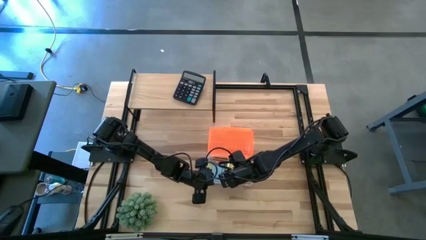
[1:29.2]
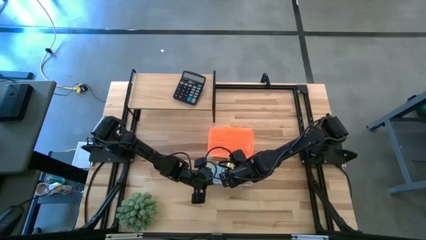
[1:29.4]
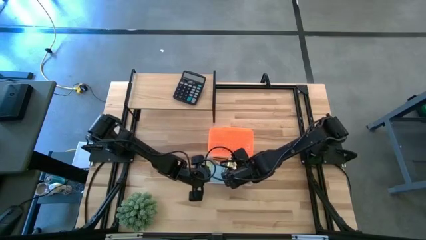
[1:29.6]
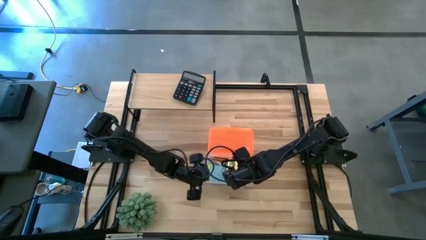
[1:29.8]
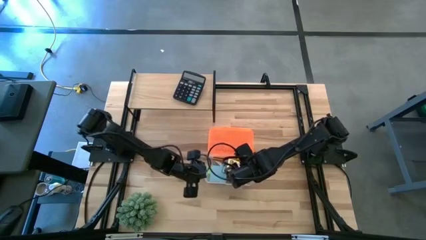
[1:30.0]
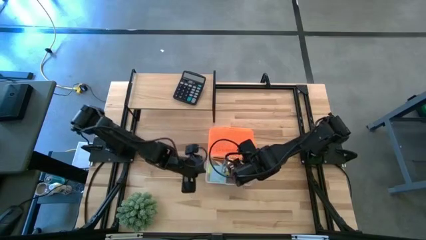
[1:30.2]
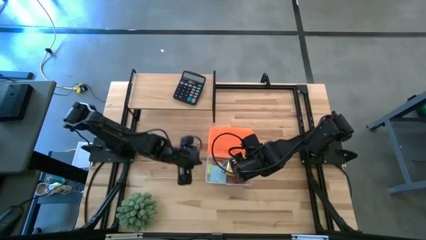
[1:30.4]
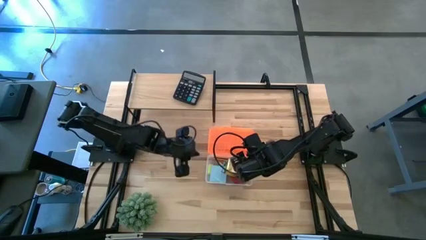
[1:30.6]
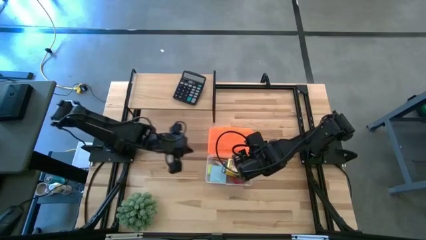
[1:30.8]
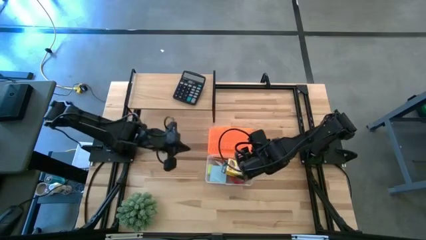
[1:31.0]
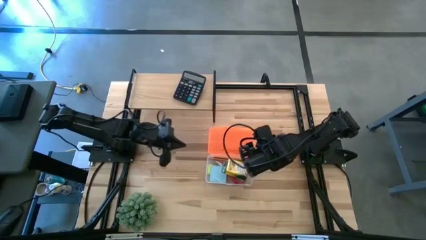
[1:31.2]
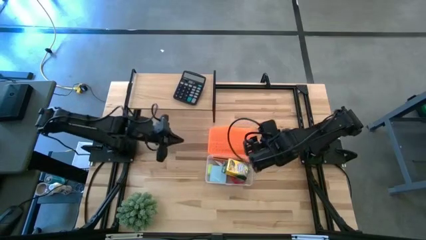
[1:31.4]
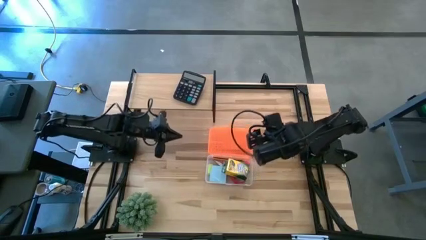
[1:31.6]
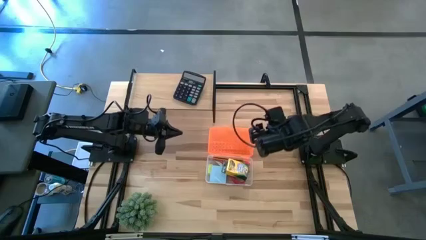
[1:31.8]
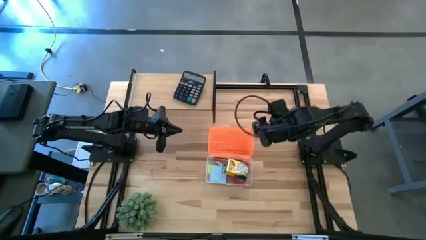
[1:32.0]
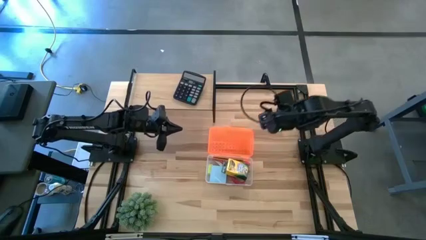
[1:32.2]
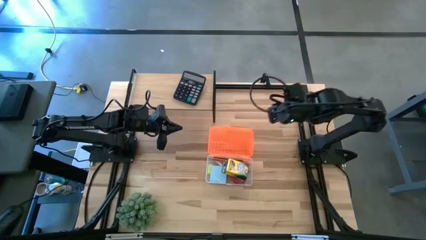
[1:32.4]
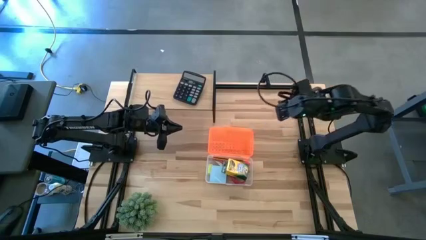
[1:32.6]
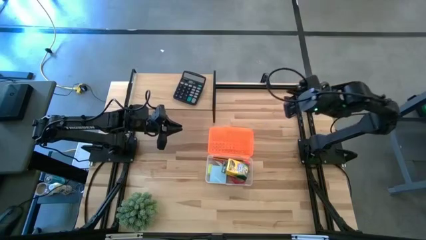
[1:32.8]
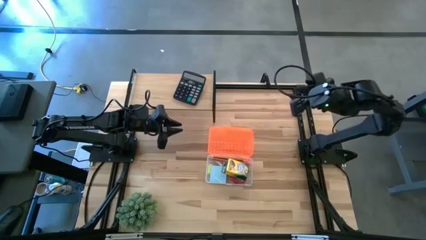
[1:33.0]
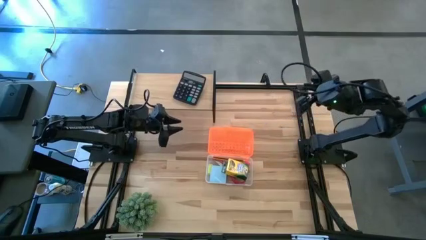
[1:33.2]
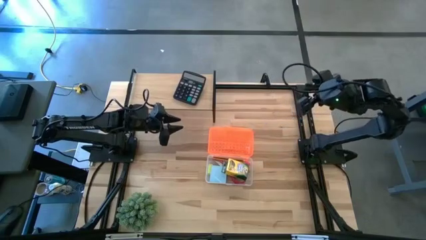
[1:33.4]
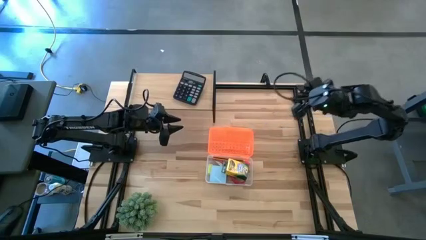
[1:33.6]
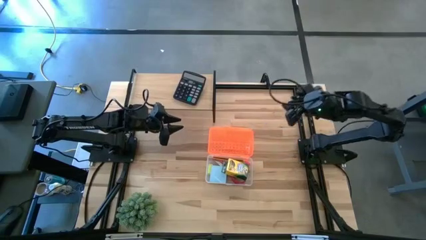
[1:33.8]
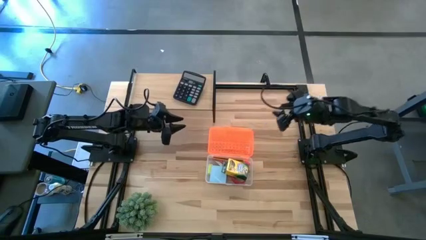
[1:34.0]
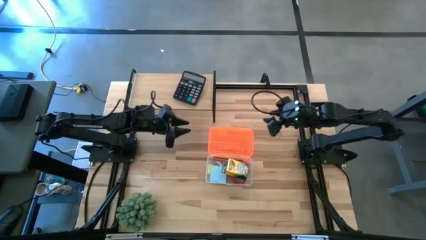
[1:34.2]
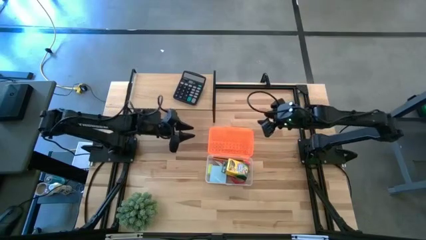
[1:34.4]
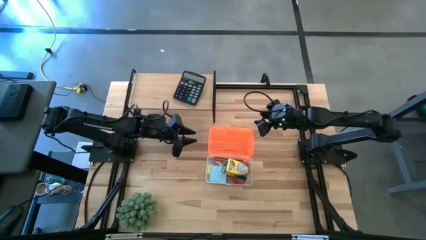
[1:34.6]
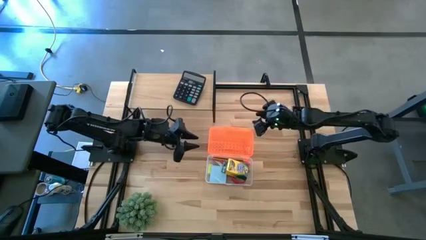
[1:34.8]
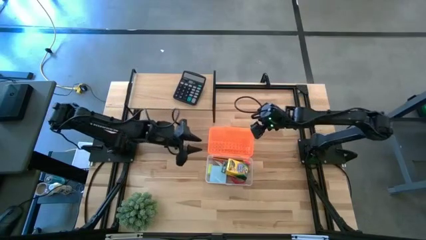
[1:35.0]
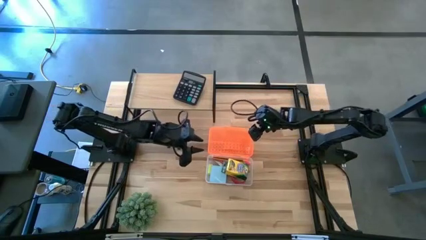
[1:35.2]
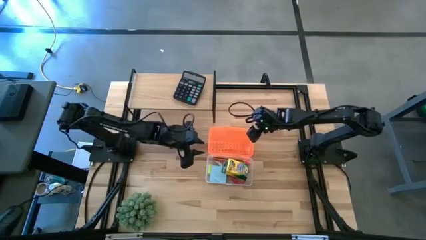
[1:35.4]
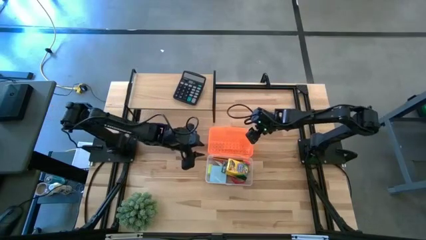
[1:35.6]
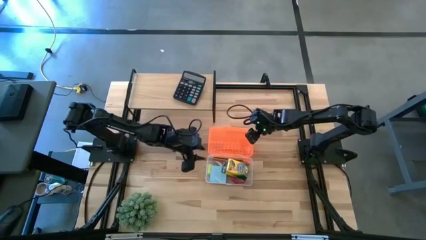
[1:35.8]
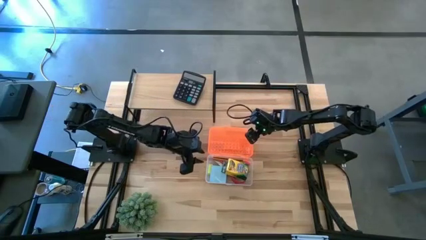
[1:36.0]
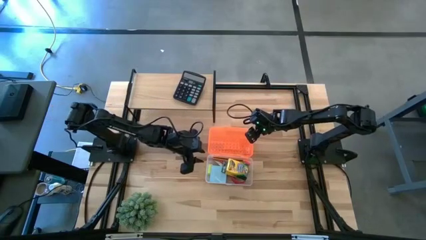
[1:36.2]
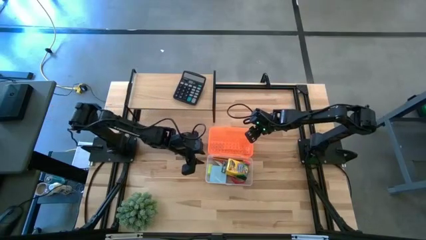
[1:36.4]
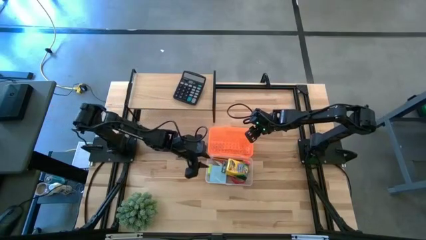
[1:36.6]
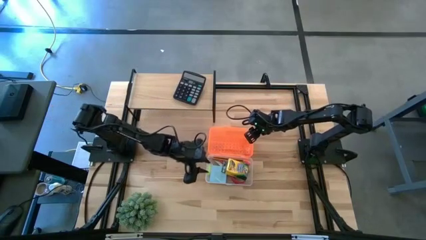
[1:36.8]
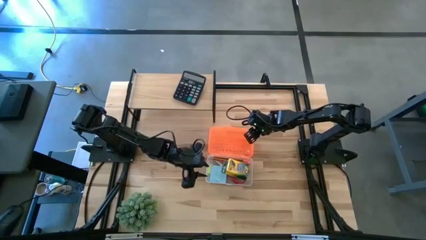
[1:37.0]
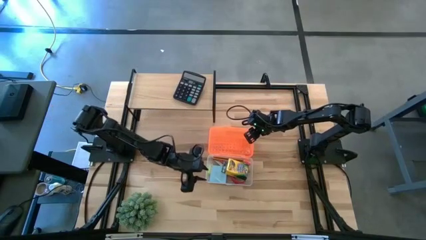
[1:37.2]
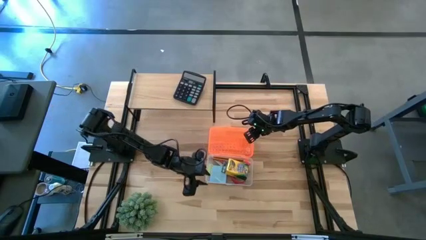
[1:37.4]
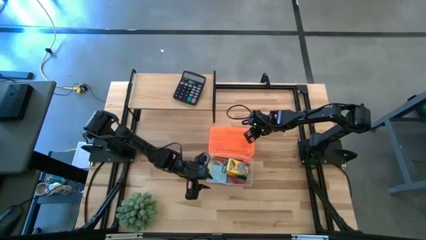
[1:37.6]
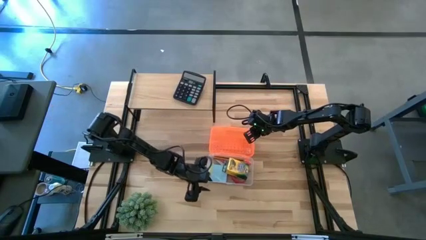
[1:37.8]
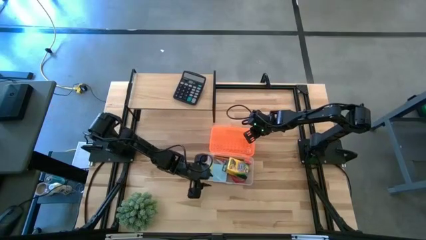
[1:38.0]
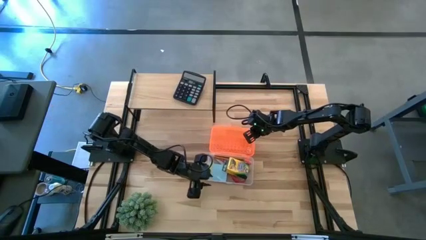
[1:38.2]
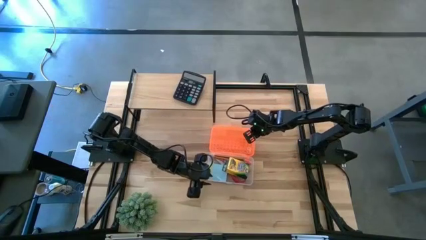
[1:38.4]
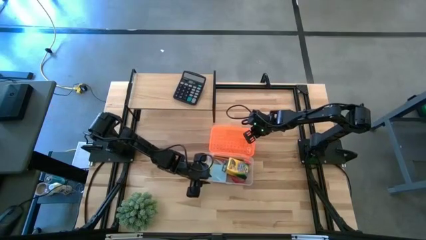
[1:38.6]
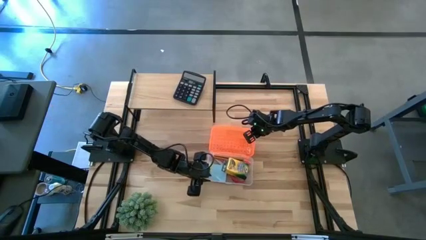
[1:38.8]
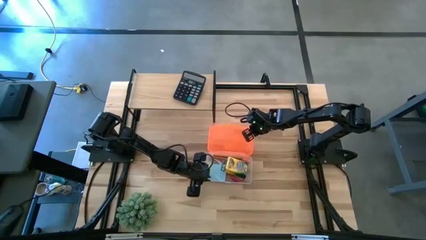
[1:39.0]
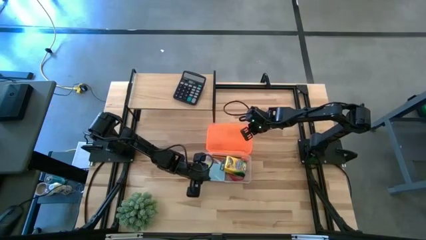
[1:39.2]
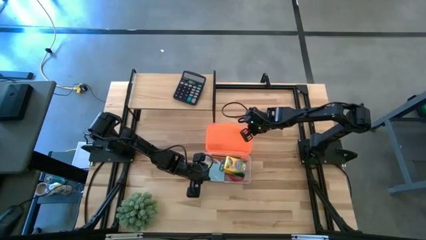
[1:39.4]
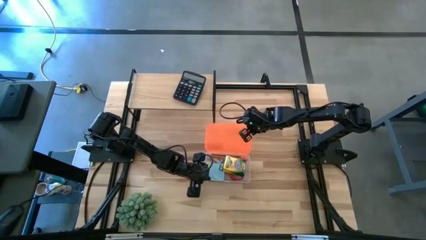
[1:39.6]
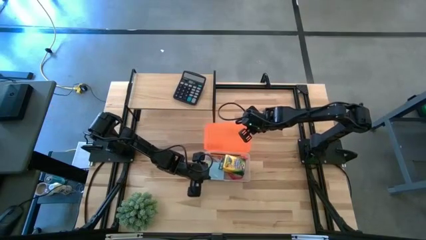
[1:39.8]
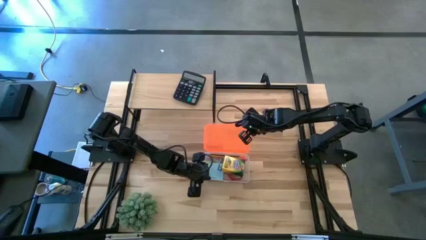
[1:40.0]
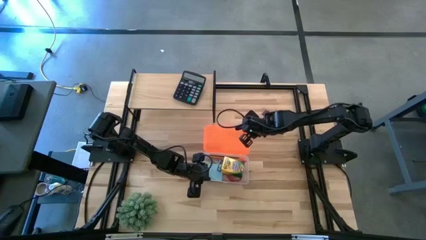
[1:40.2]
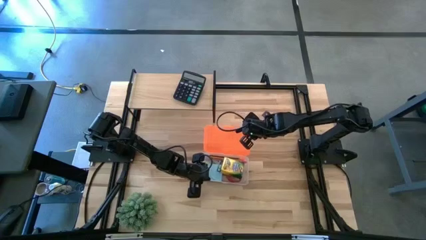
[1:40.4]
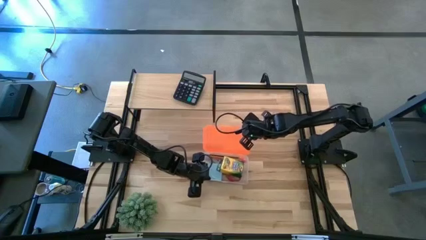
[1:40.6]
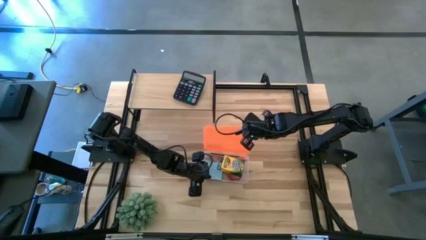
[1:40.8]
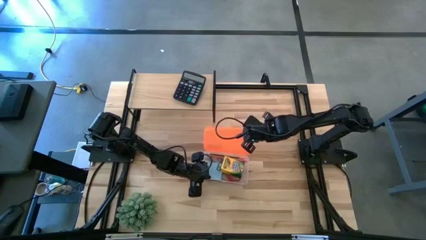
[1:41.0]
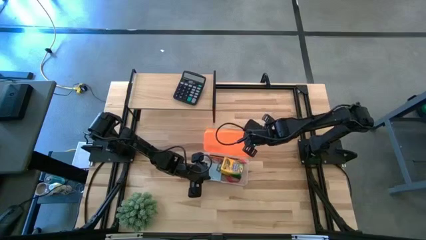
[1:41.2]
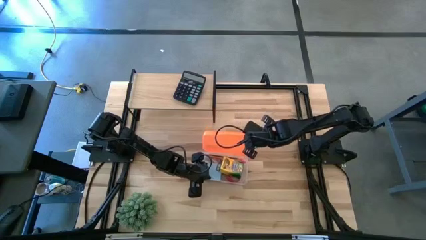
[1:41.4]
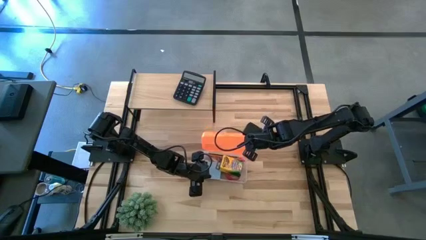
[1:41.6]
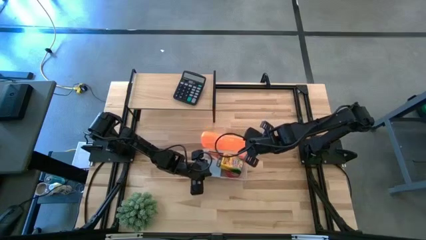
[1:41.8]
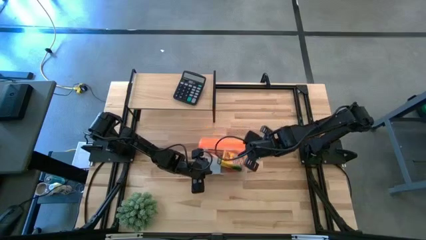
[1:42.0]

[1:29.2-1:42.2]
Task: Pack school essentials
Close the supply box

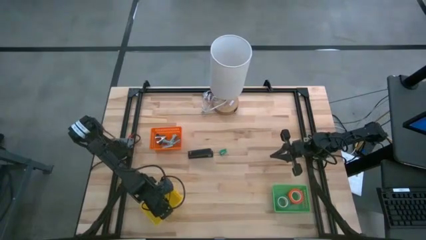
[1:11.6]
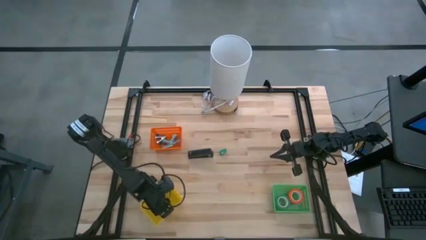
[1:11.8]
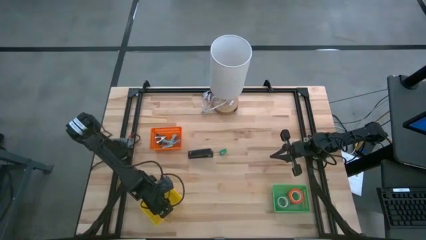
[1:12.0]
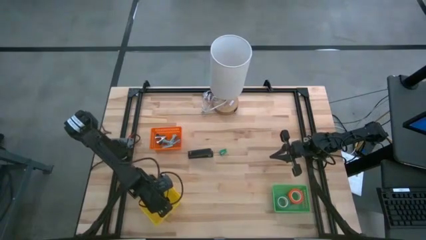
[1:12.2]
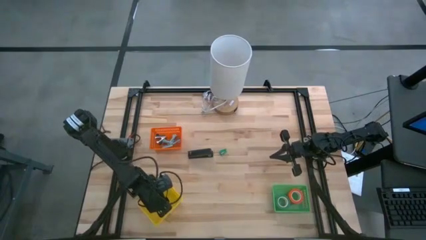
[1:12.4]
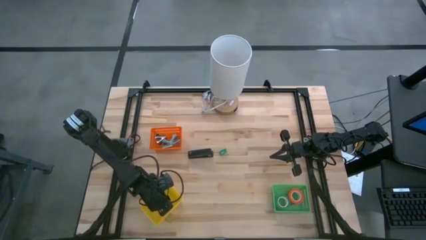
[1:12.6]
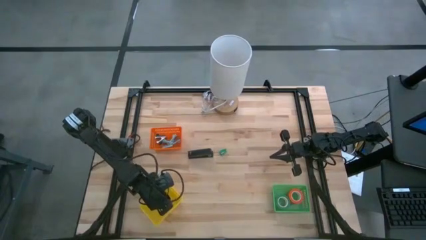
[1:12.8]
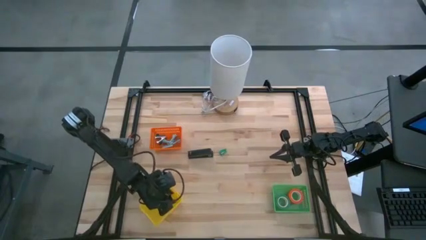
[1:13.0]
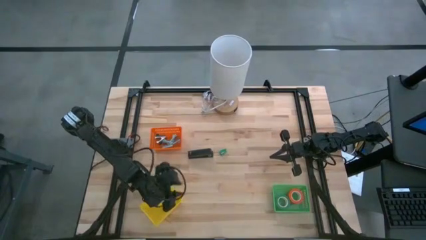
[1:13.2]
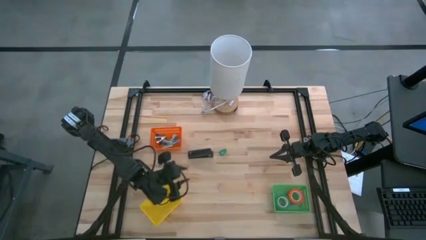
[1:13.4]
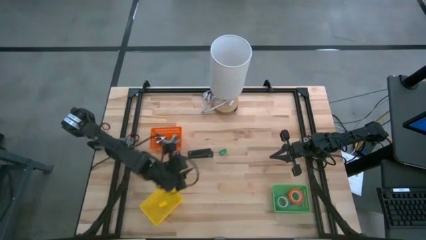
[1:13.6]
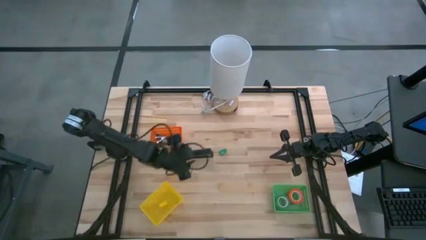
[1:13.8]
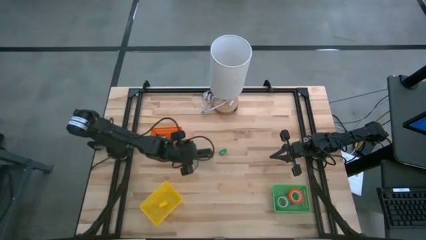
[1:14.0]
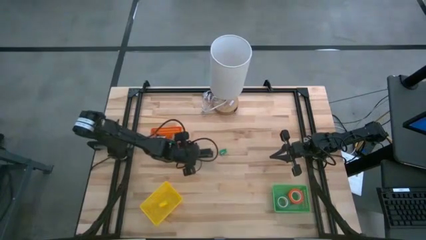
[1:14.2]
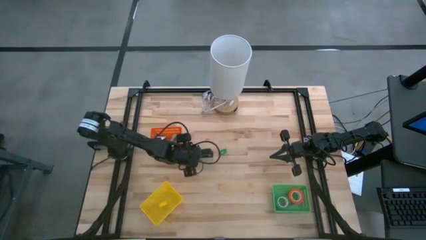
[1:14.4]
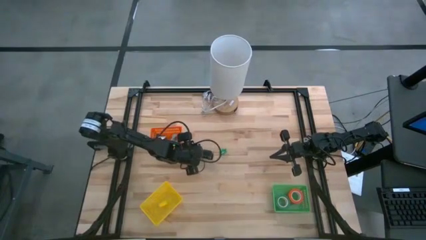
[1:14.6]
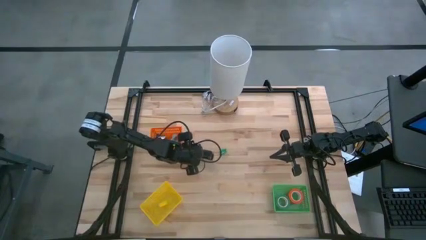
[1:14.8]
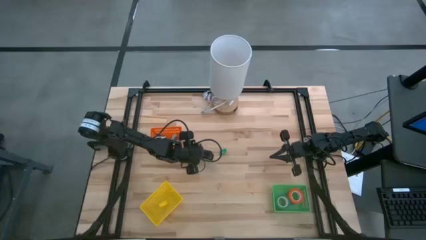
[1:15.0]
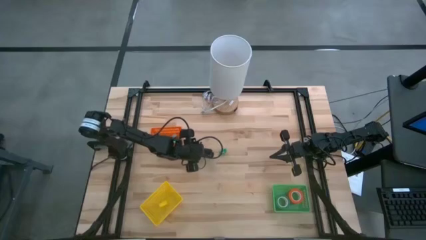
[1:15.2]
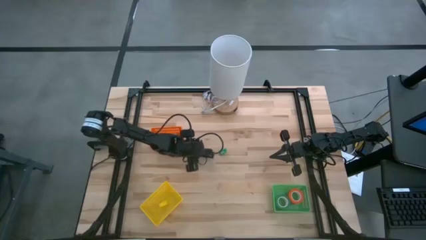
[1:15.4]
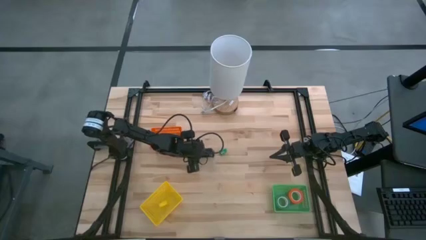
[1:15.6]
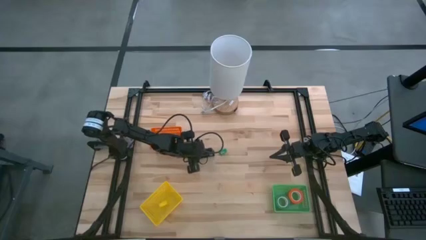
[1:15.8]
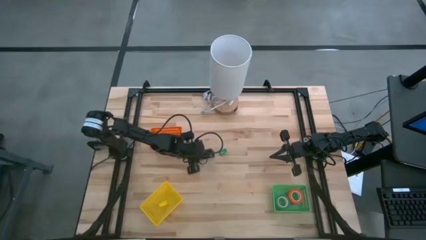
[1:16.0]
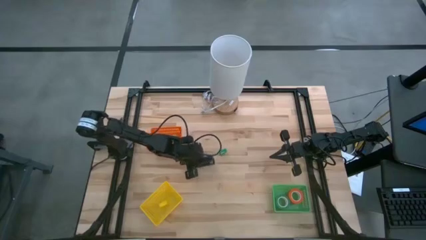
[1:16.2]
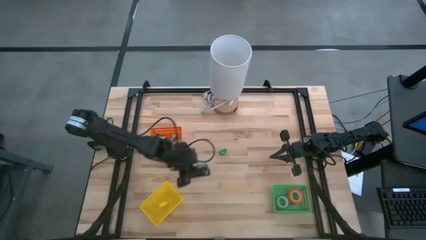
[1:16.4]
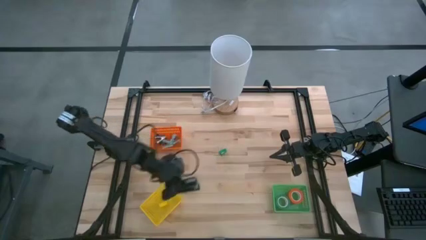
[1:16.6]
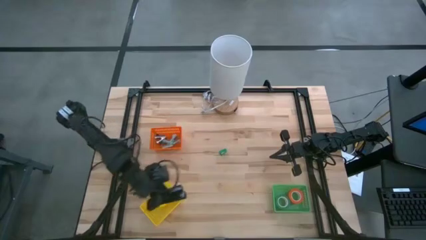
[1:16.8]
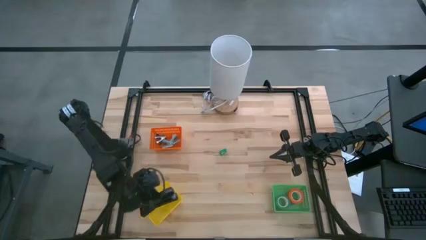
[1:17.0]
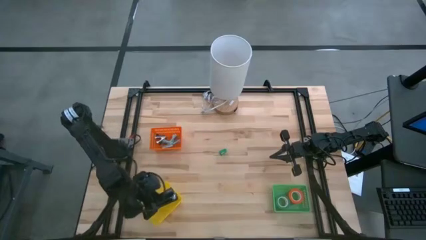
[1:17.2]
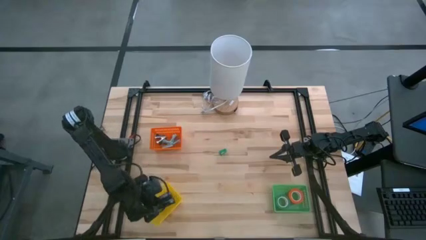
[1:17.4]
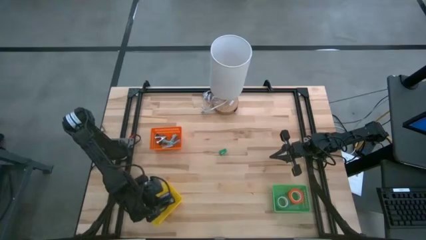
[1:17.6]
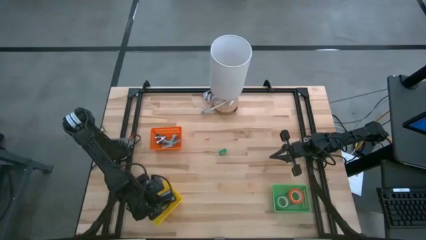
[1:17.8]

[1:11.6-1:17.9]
Task: Pick and place Stapler, Stapler remover, tape
Put the black stapler into the yellow bin
